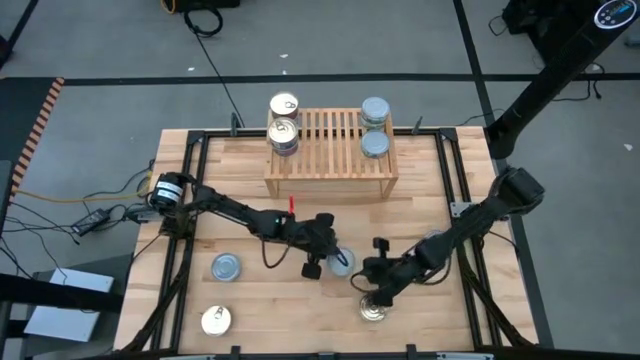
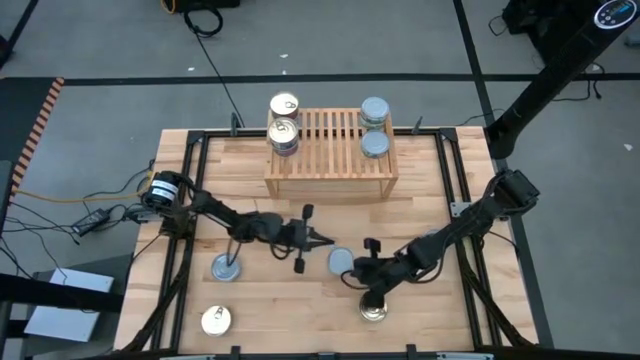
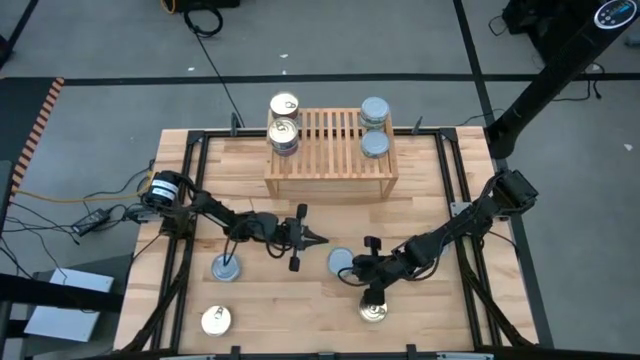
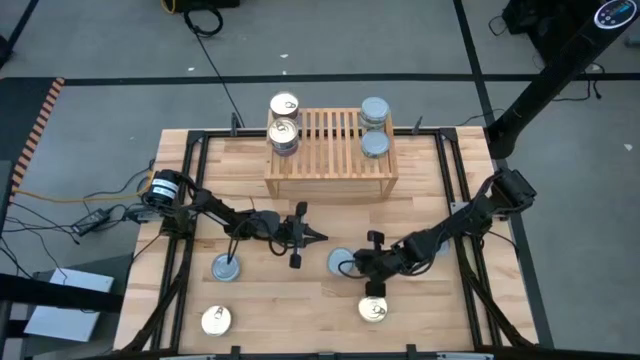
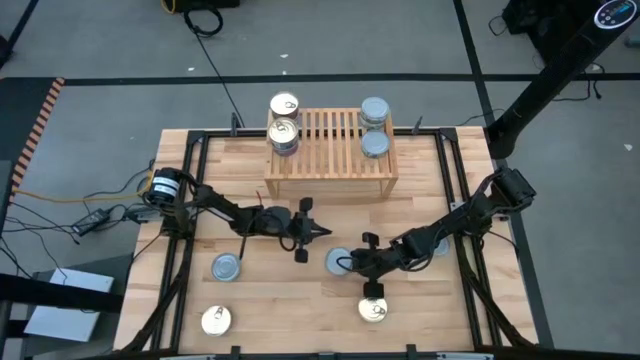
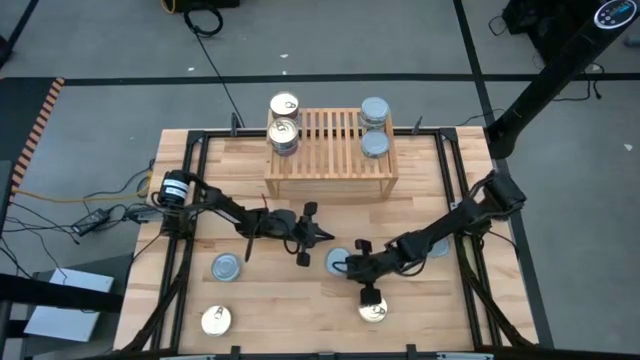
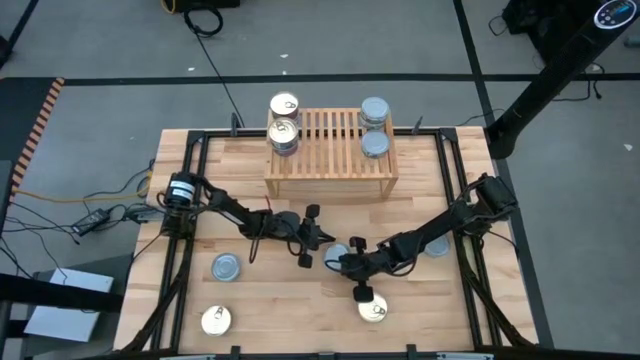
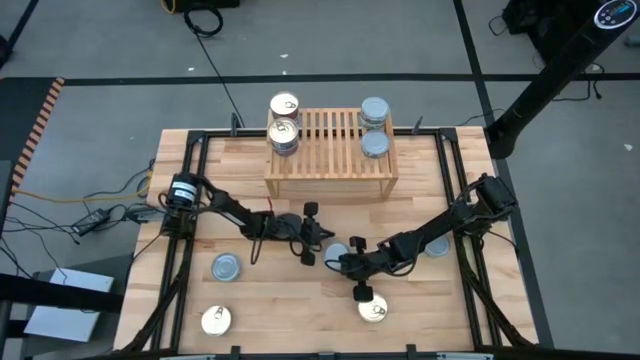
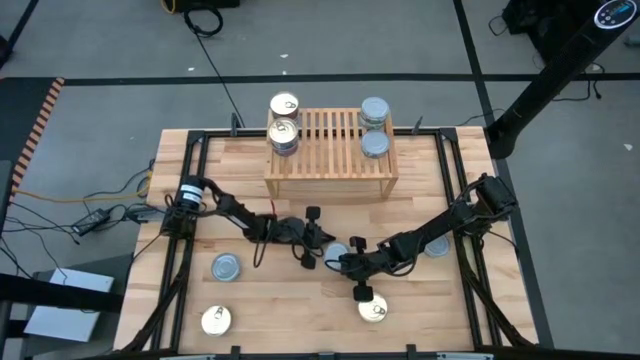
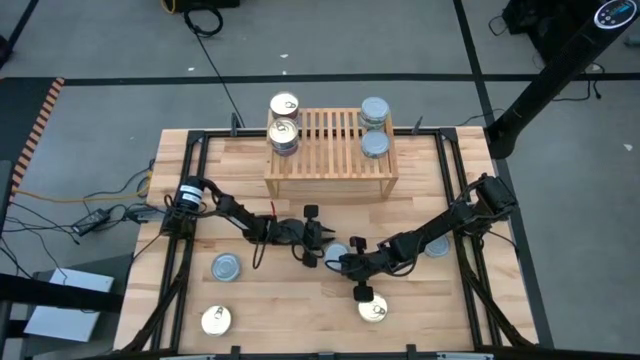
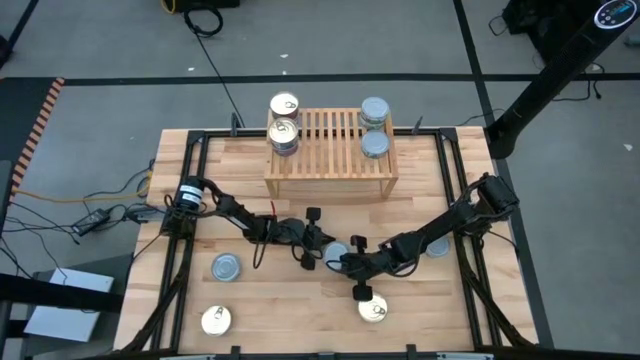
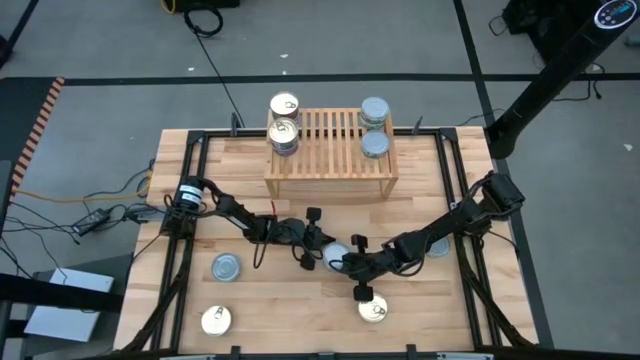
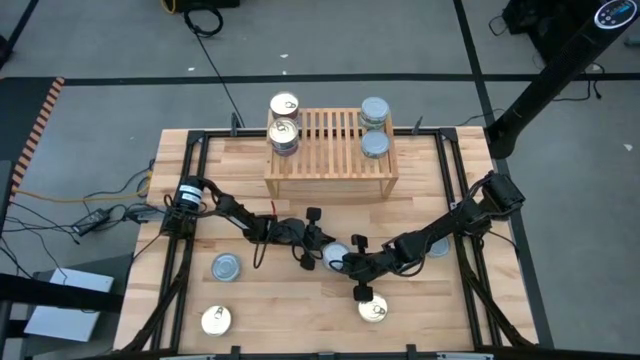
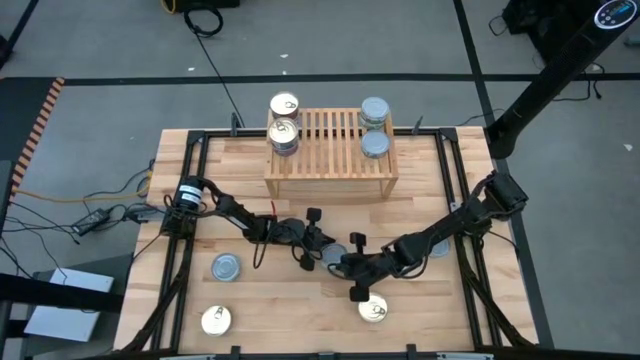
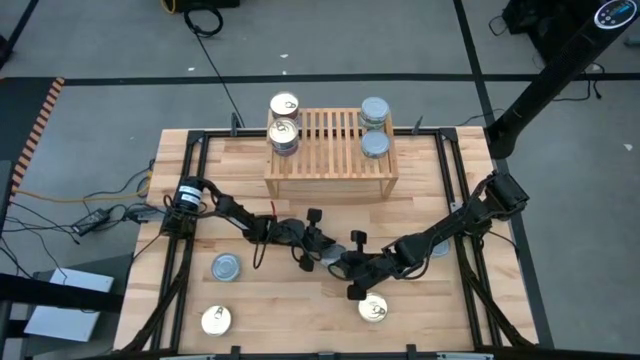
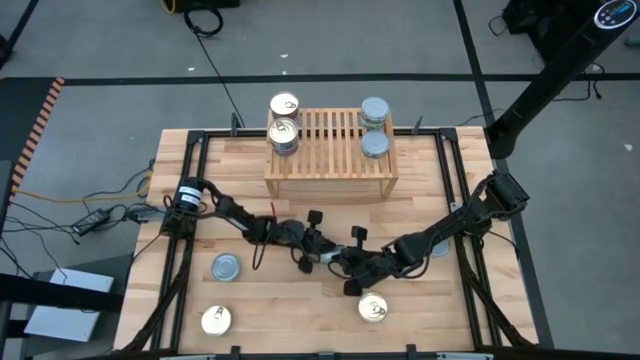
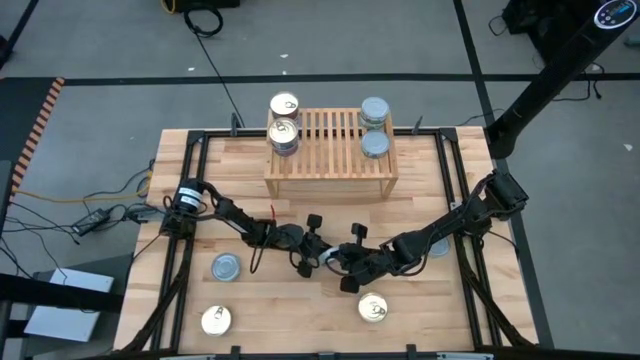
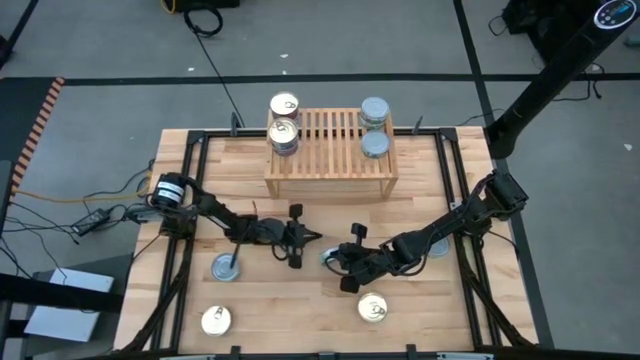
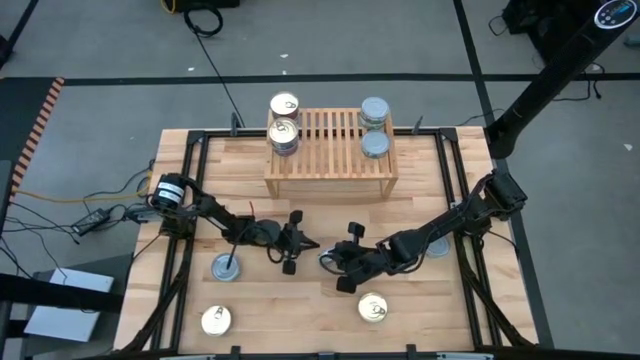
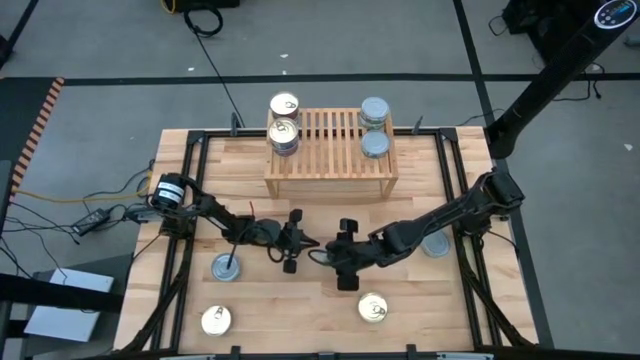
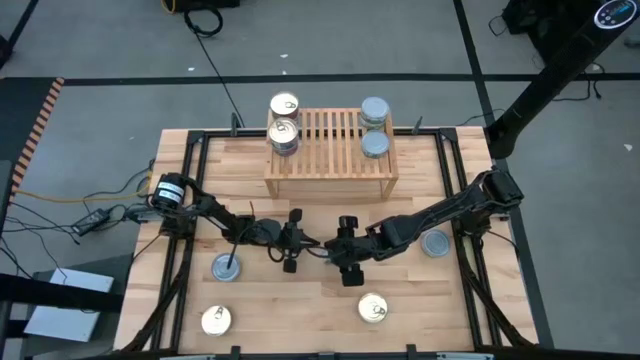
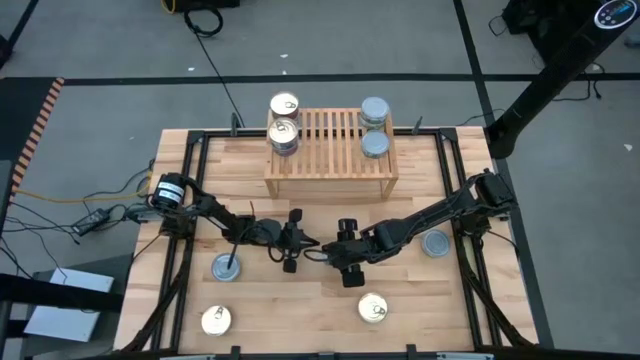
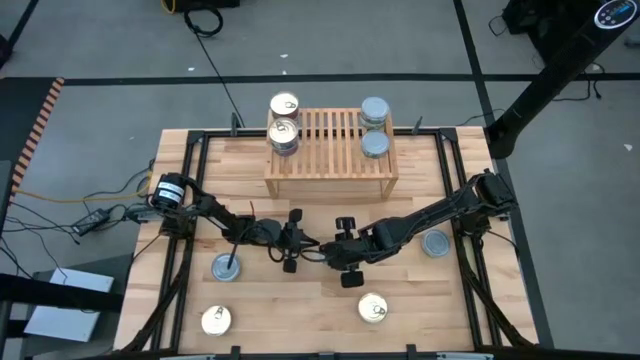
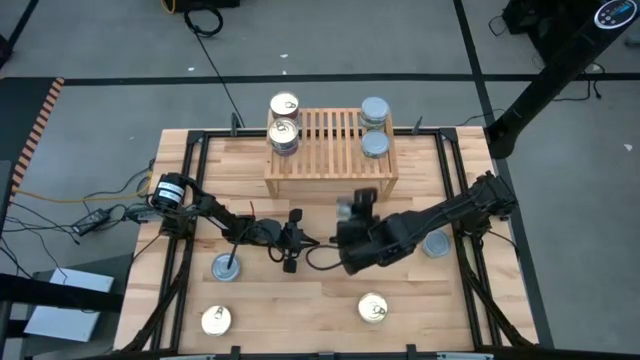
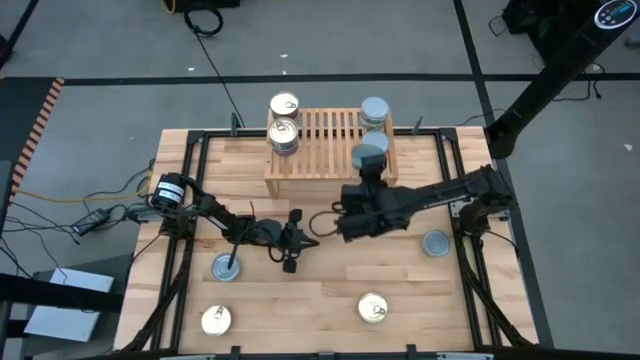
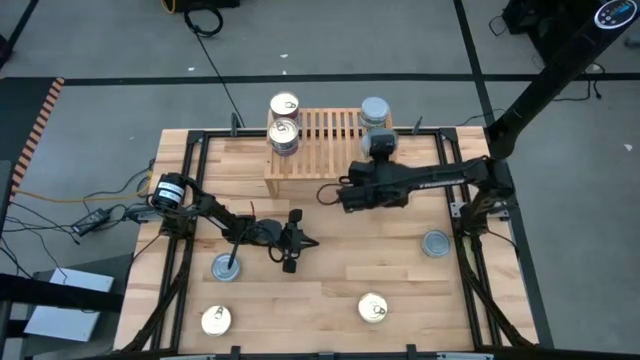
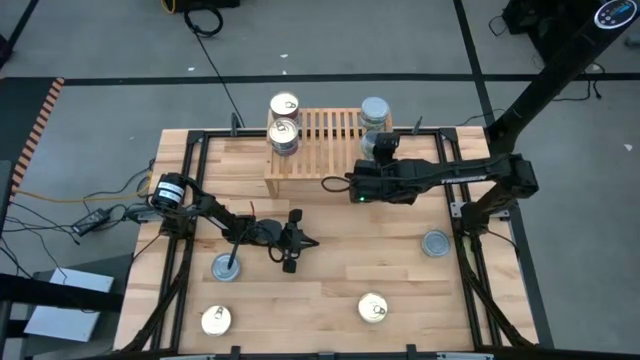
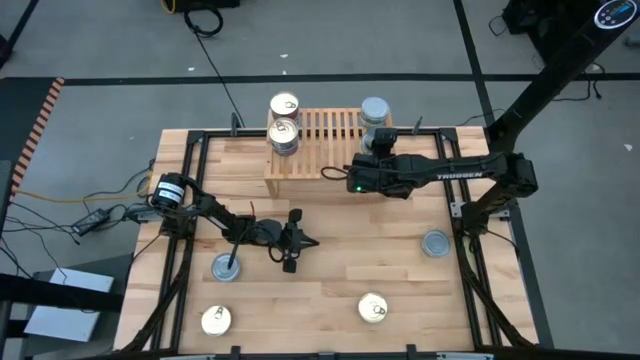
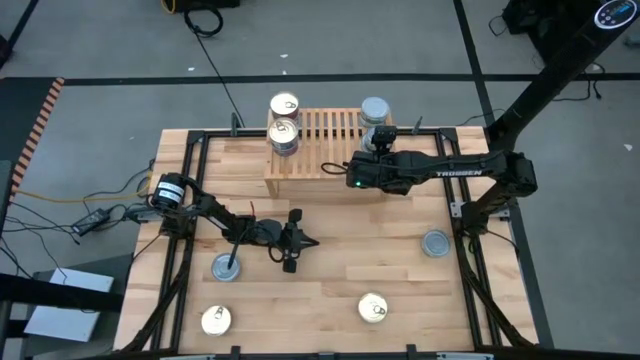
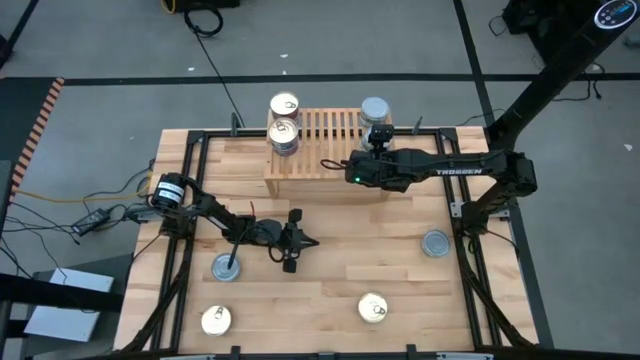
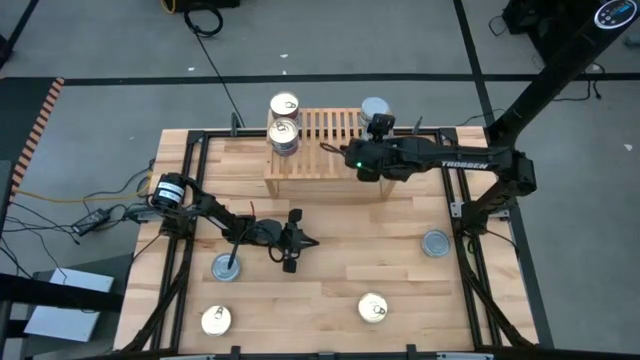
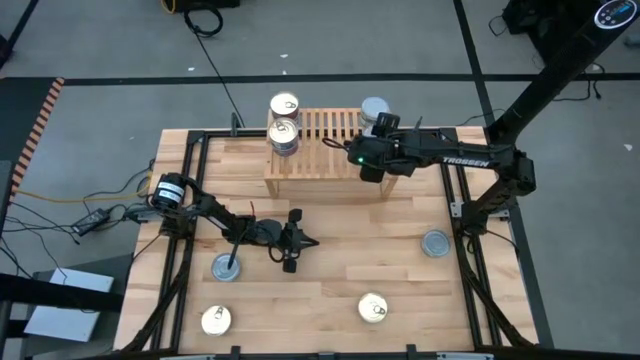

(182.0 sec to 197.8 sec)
Task: Stack canned seafood by type on shelf
Stack the green tuna can on top of the green tuna can on the shelf
